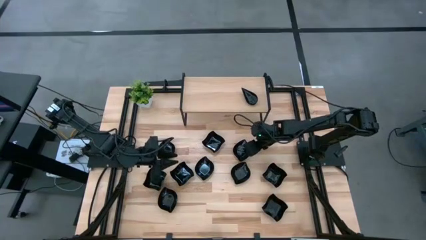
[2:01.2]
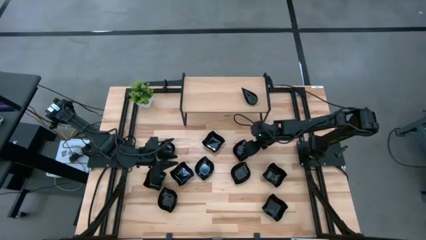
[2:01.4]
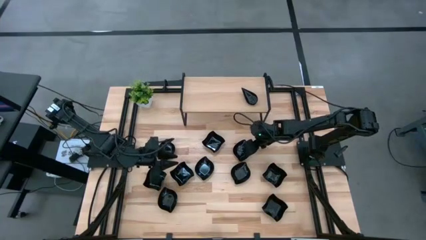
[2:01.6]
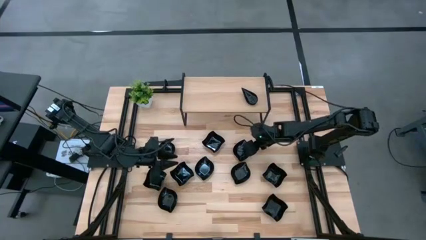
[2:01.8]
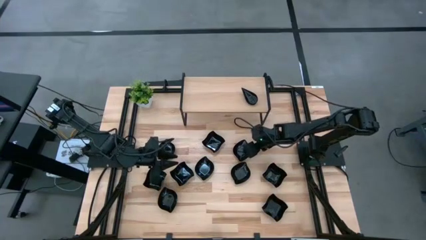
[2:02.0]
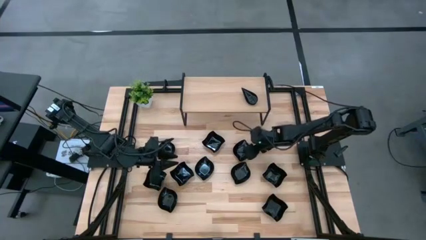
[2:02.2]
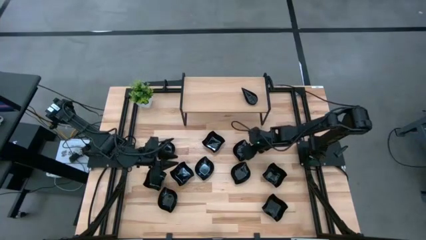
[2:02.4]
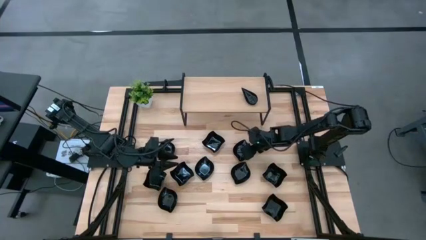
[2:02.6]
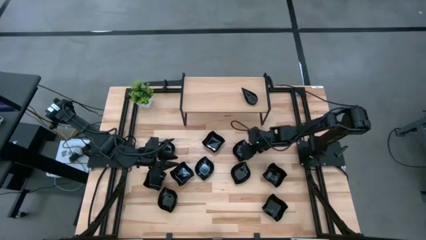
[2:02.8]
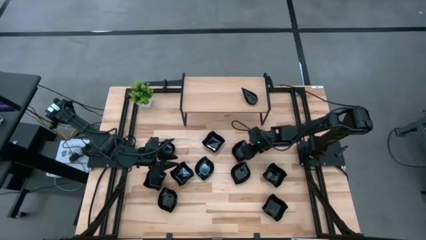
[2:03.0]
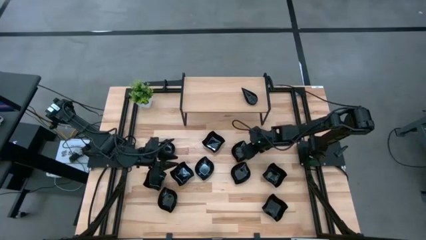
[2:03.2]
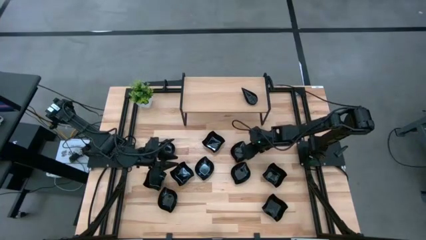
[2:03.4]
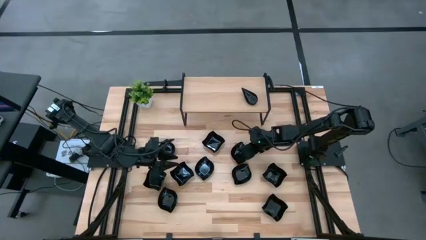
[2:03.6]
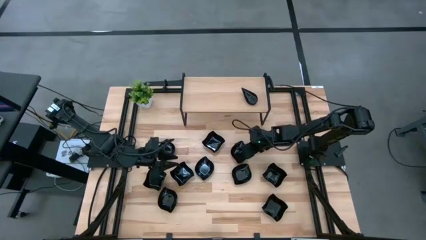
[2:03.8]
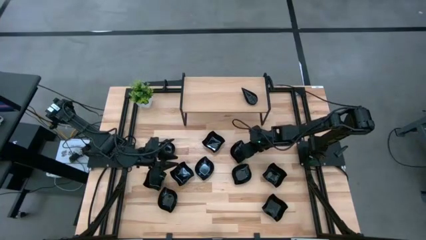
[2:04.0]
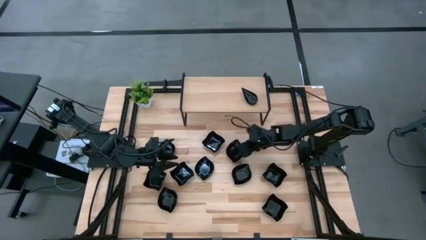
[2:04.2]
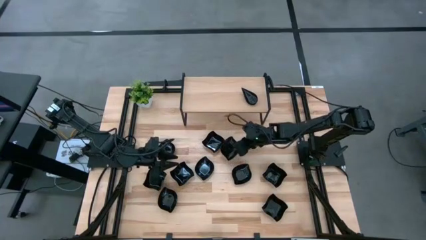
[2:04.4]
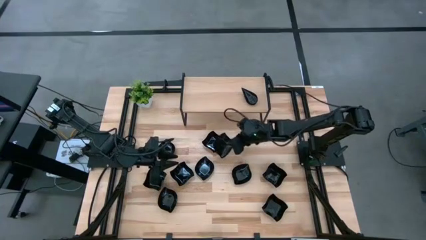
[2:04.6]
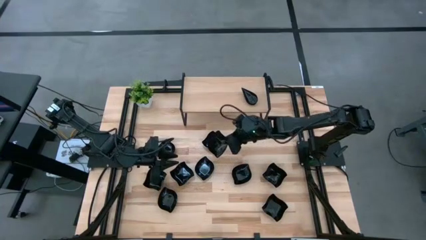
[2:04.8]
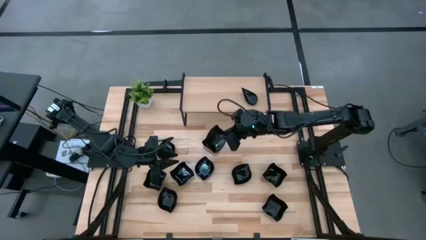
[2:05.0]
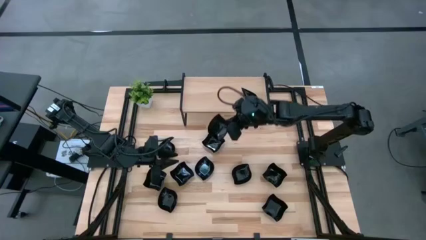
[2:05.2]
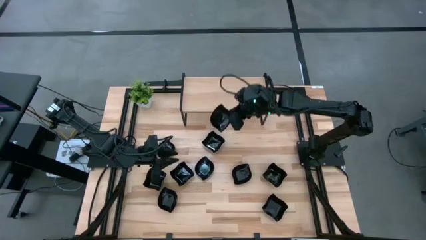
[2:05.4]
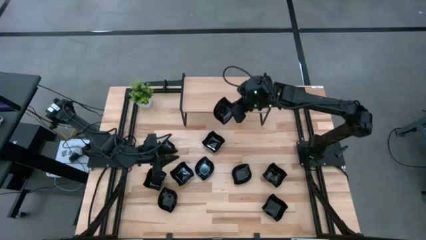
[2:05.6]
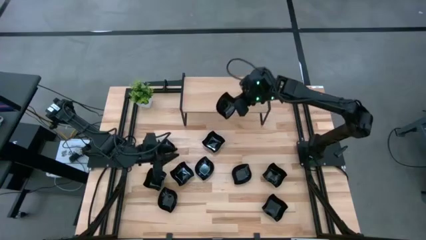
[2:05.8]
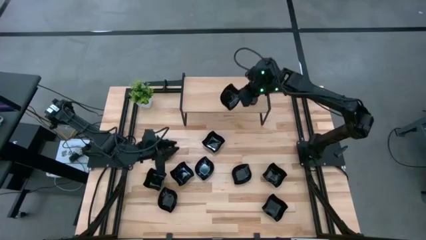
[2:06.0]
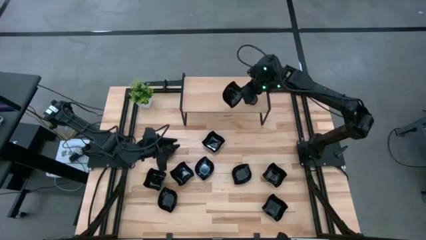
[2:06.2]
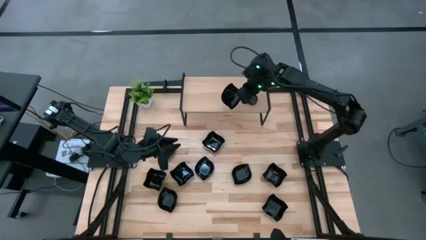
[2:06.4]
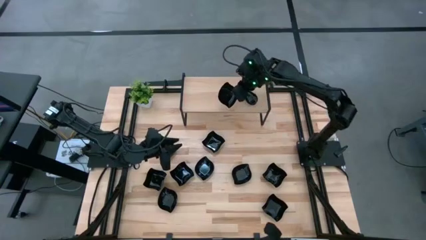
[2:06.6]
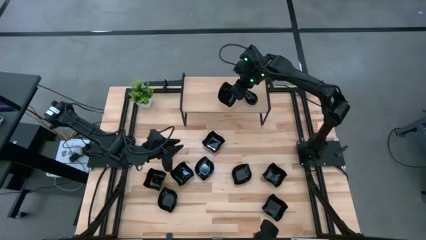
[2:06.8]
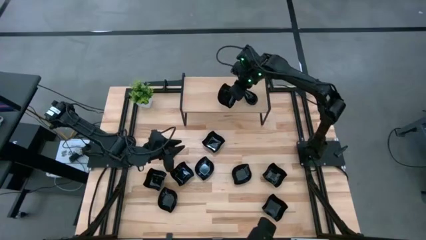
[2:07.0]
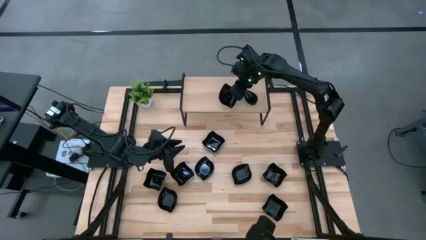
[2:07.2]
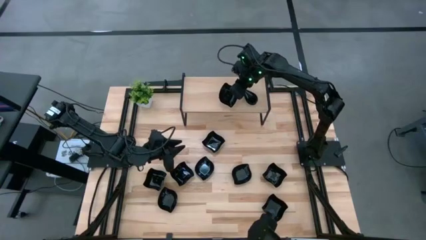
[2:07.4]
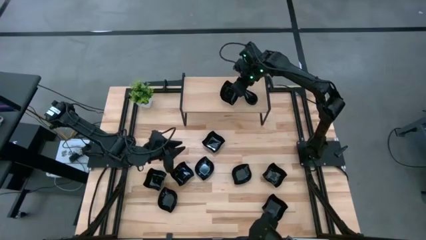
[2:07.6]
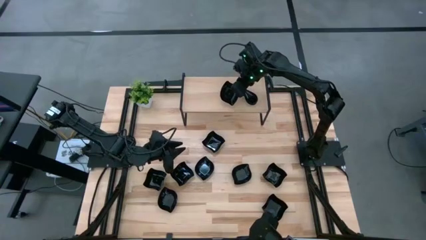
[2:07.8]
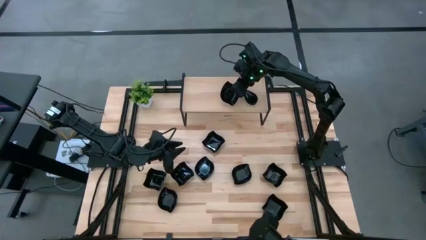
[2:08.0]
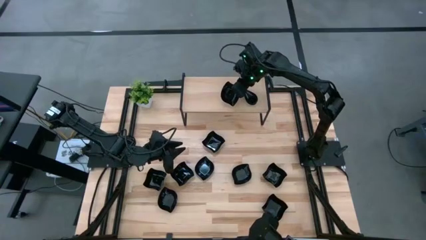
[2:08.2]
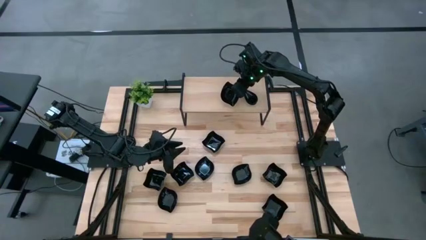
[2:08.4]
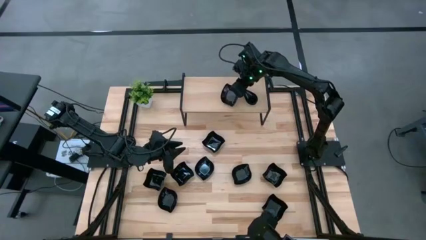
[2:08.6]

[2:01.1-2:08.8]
Task: Pick & Place Mini shaped plates
Put the black leaf shaped plate on the shelf

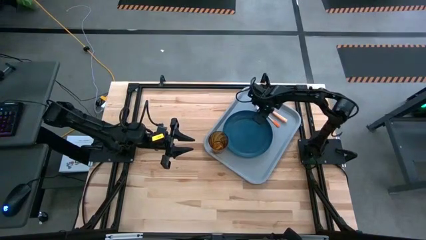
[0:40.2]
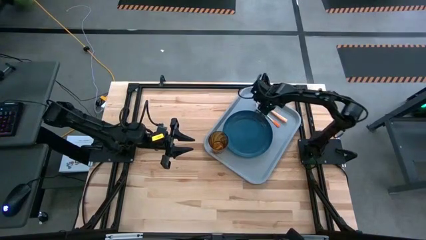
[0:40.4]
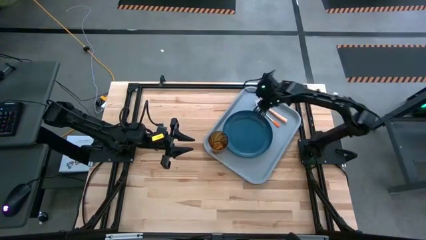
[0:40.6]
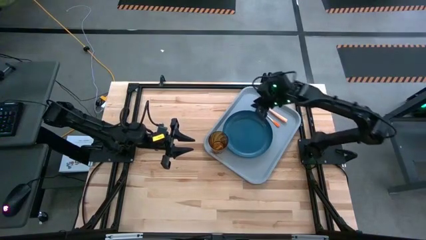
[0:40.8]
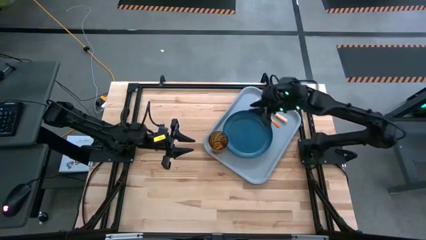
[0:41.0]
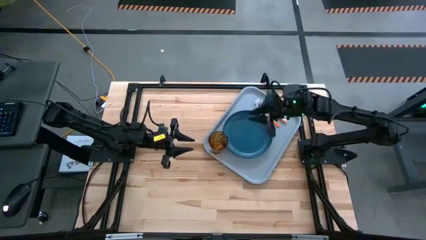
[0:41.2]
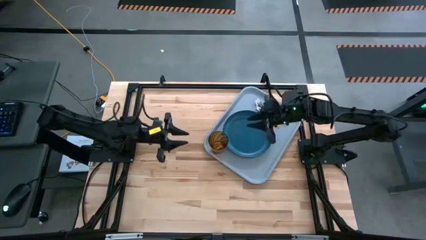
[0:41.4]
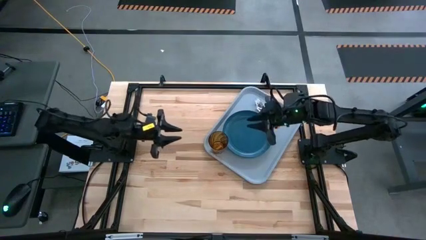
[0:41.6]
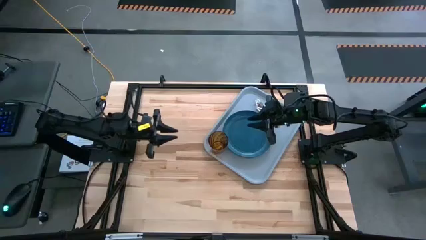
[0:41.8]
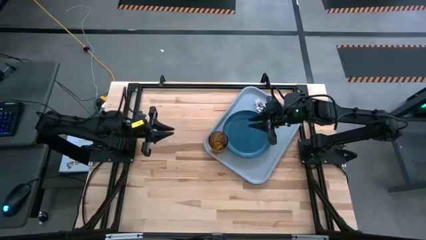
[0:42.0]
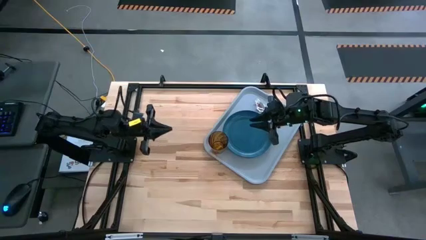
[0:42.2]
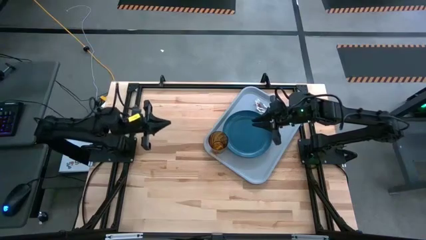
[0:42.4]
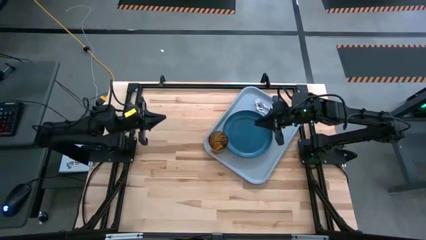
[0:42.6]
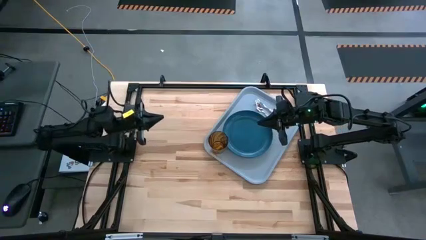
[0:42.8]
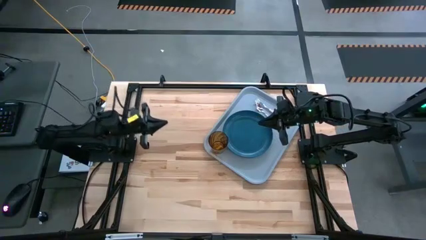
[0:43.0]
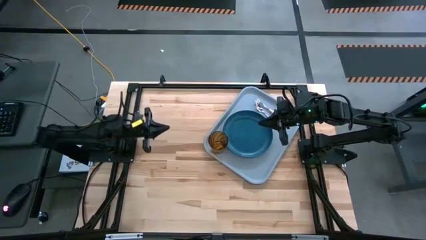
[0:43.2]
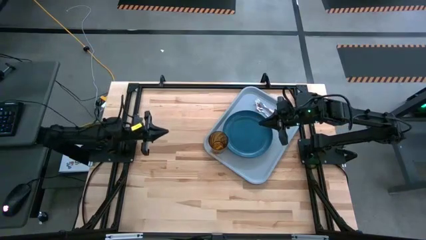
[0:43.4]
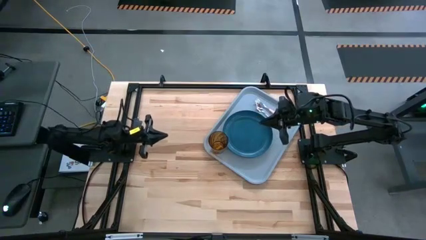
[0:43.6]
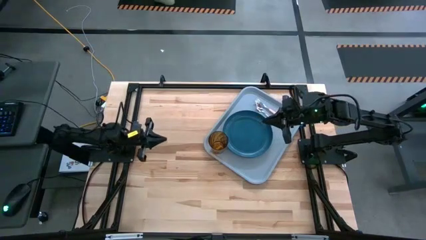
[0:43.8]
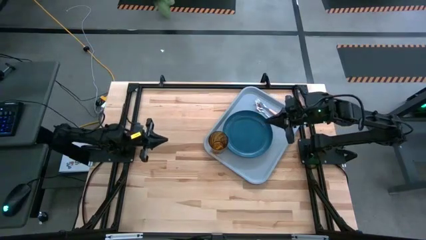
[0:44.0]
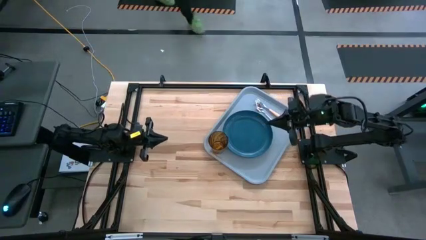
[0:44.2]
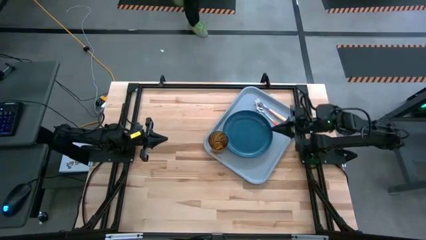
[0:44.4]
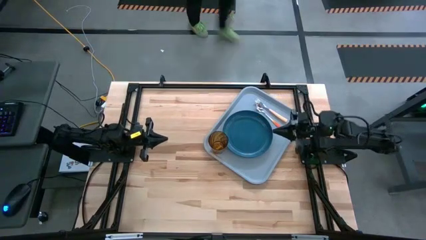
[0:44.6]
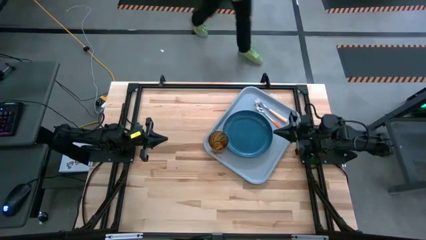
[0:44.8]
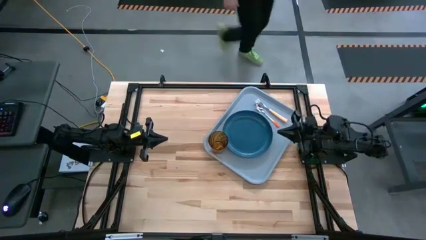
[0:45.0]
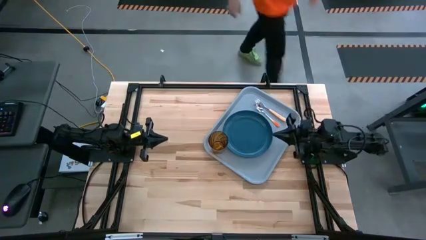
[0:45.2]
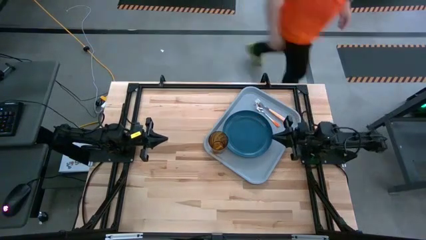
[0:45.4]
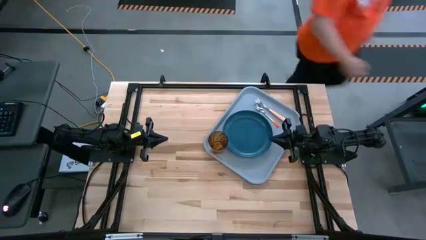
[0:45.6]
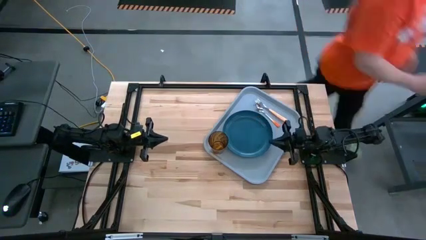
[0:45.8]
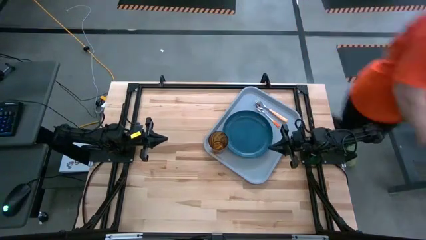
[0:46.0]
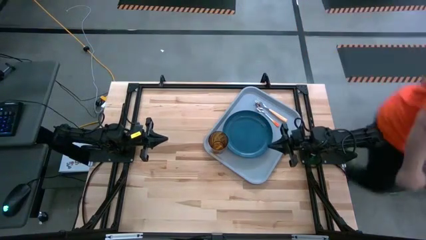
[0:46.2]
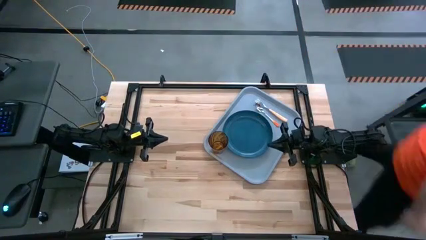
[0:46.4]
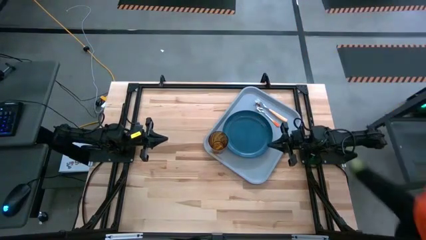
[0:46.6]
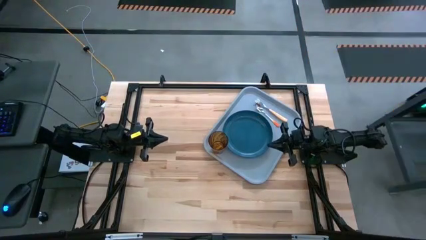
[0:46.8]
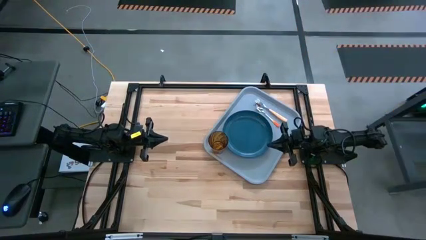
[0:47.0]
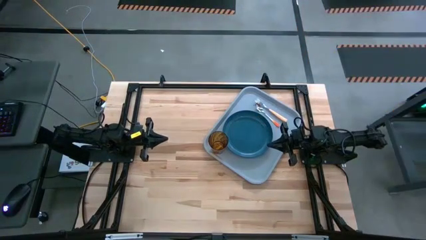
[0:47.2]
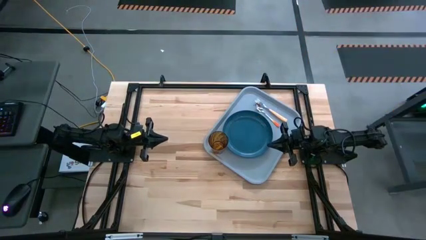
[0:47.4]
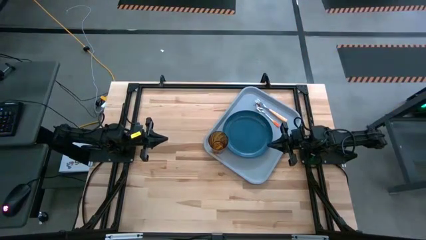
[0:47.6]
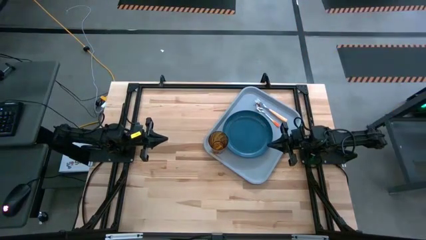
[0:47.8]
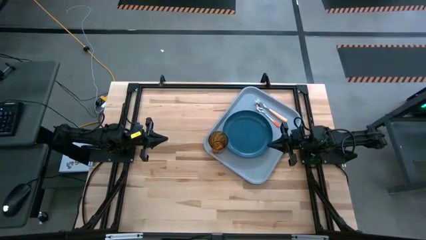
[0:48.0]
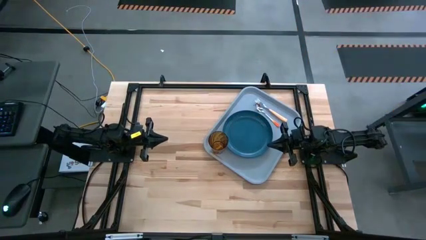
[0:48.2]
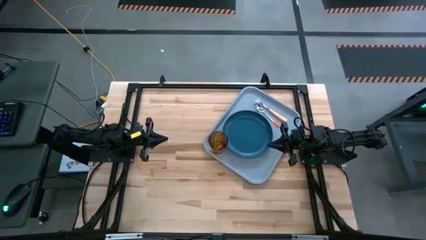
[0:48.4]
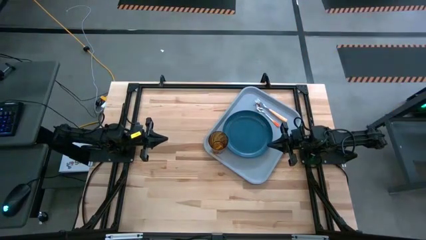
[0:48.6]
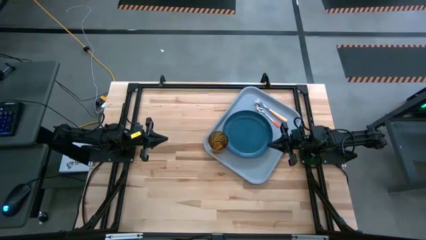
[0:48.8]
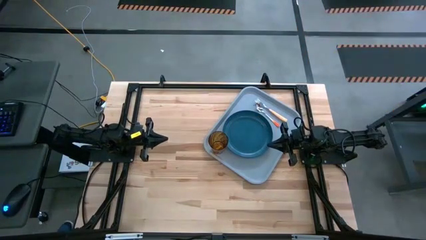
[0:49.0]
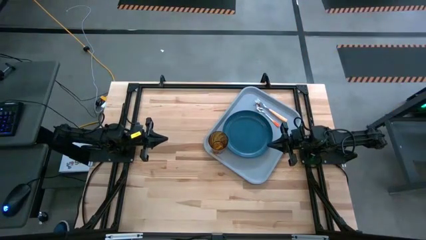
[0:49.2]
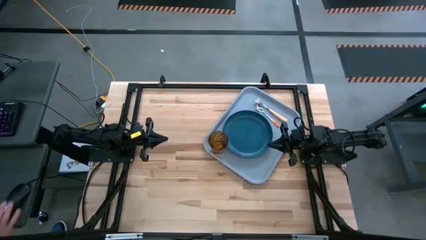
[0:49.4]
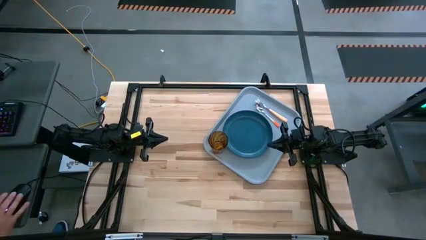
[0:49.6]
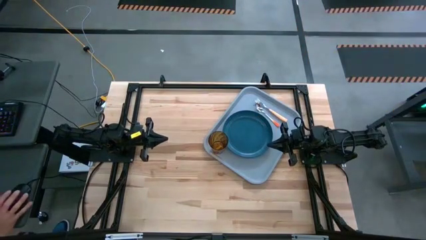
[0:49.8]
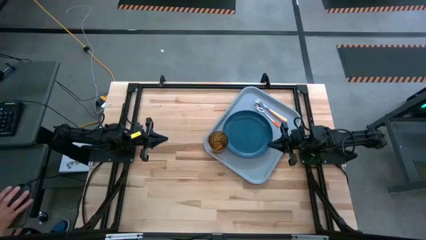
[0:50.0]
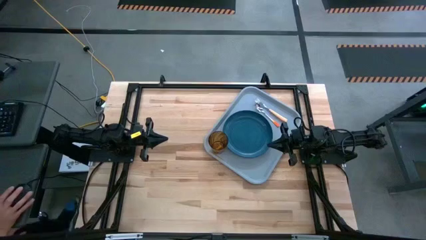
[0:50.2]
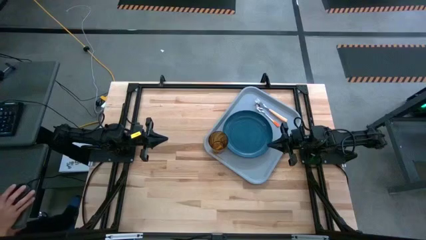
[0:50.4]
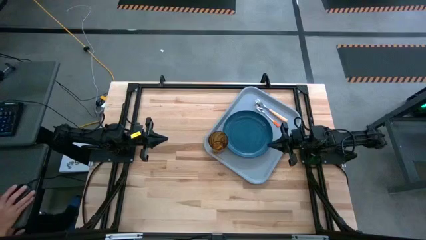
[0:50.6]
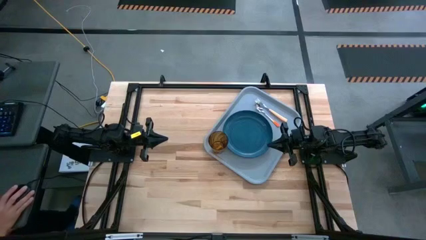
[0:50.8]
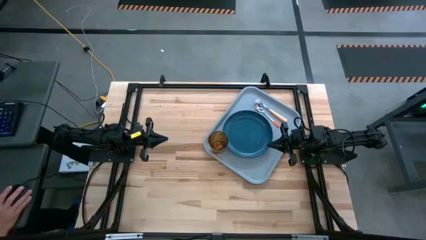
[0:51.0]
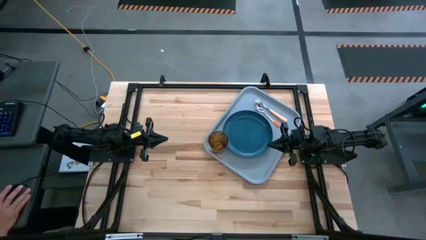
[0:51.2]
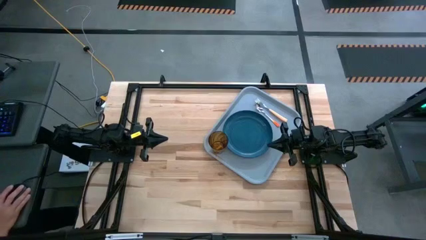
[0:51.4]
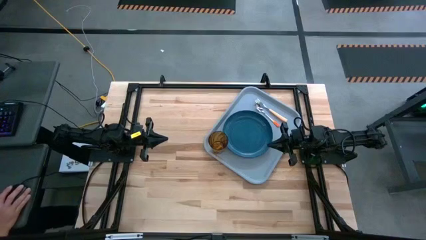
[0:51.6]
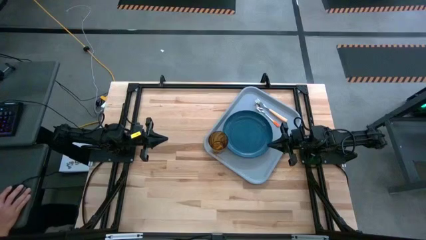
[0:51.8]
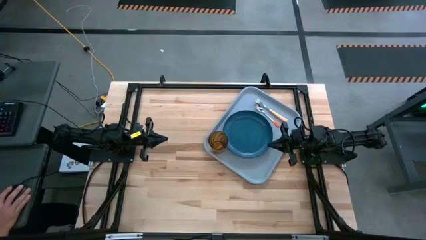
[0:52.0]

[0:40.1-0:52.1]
Task: Pick and place plate/cup/fork/spoon on tray
Return to Home Position
